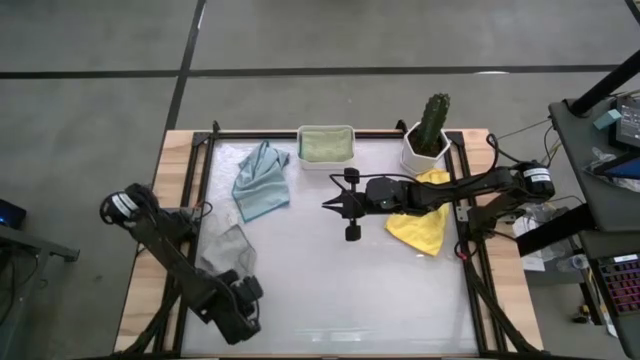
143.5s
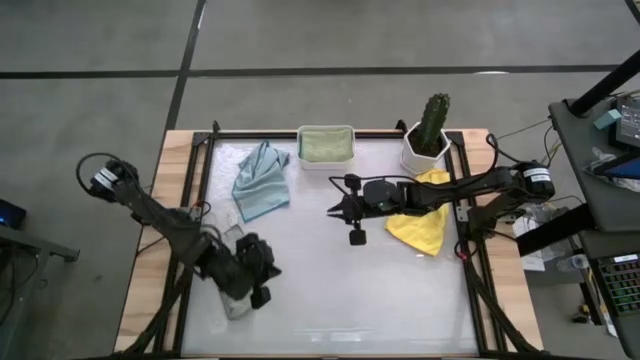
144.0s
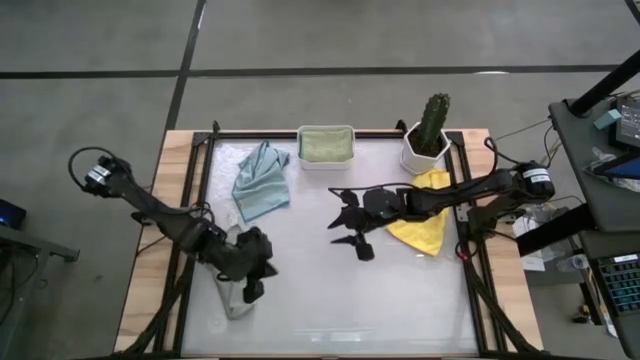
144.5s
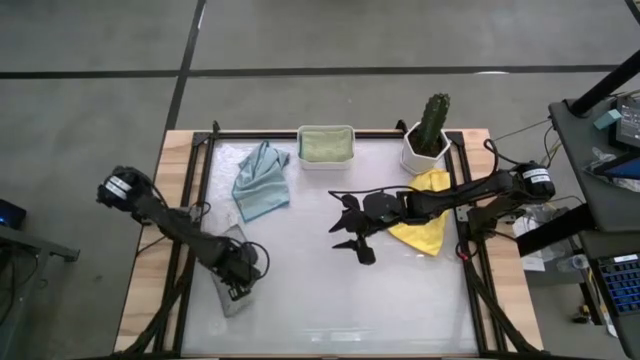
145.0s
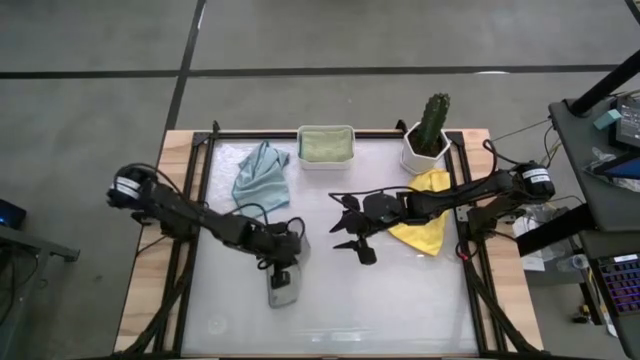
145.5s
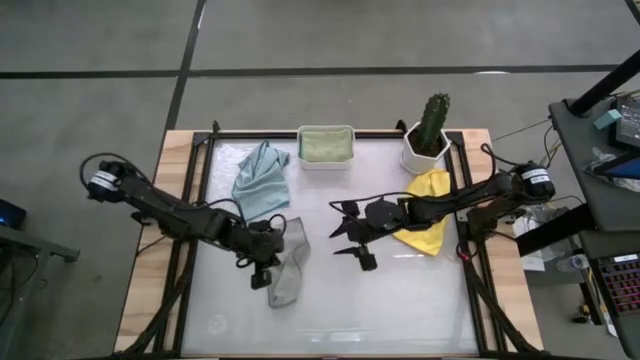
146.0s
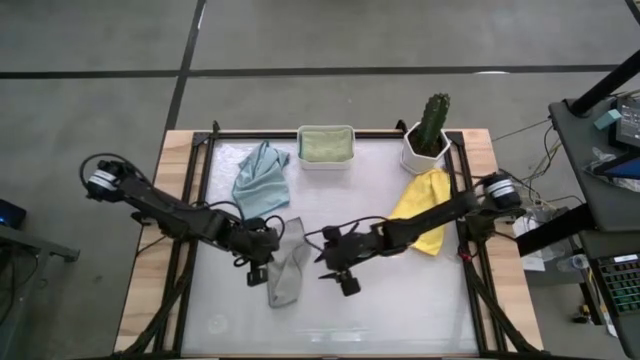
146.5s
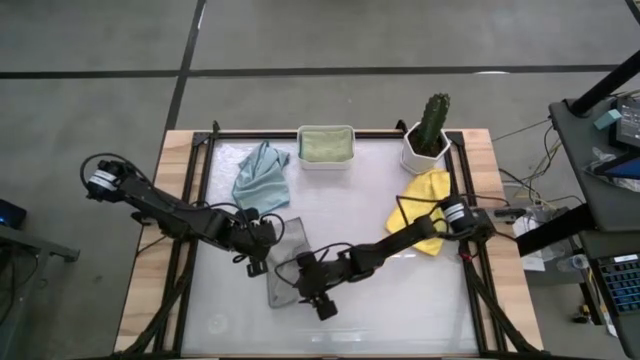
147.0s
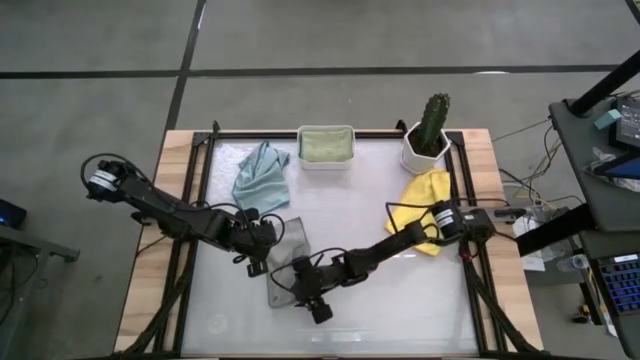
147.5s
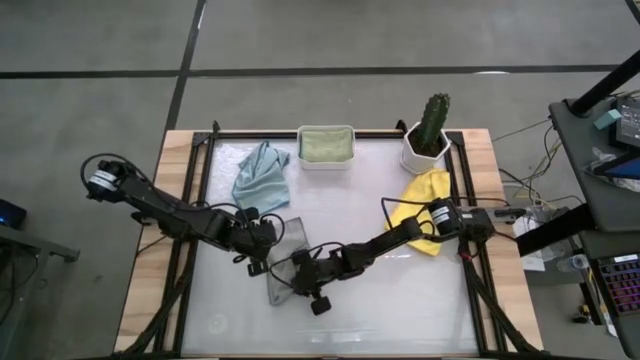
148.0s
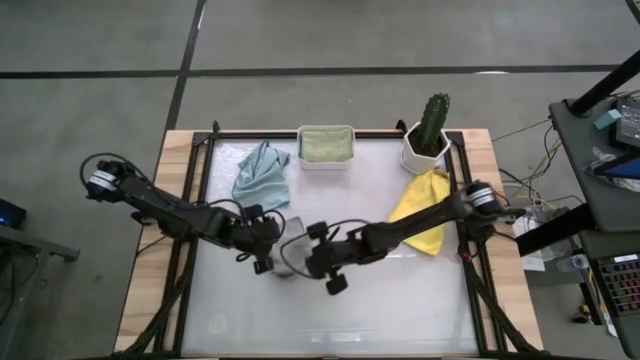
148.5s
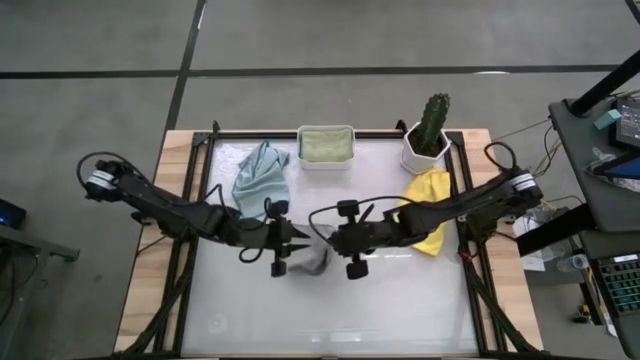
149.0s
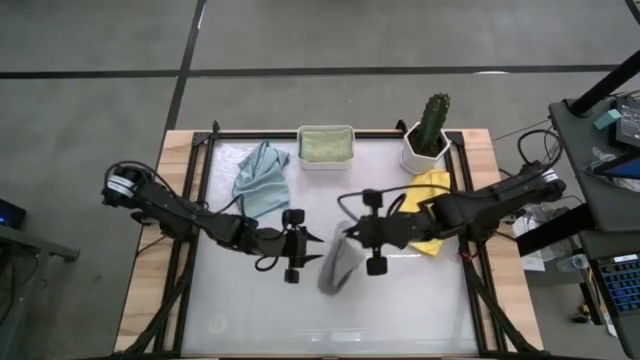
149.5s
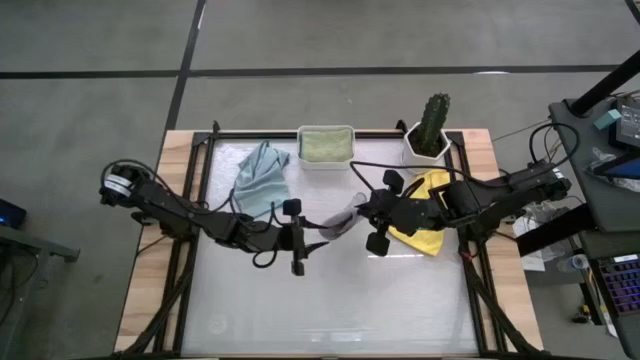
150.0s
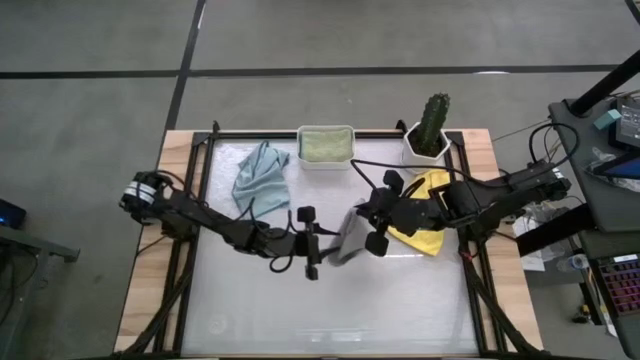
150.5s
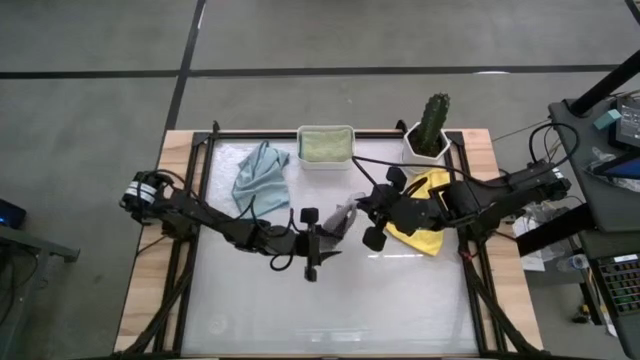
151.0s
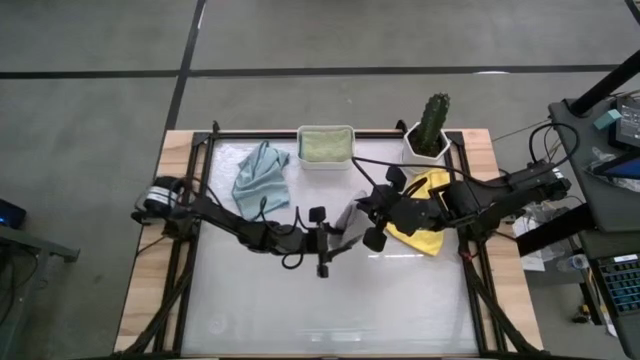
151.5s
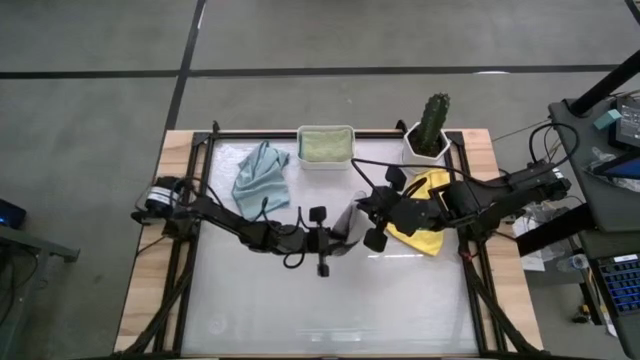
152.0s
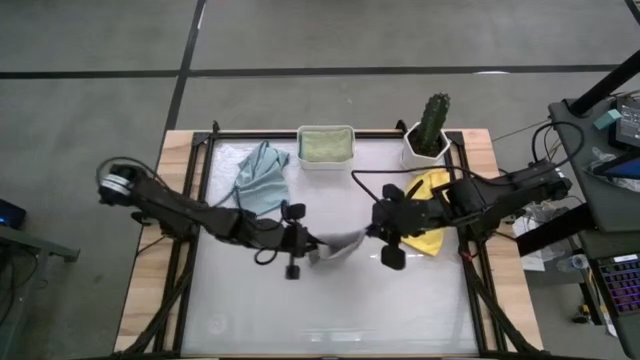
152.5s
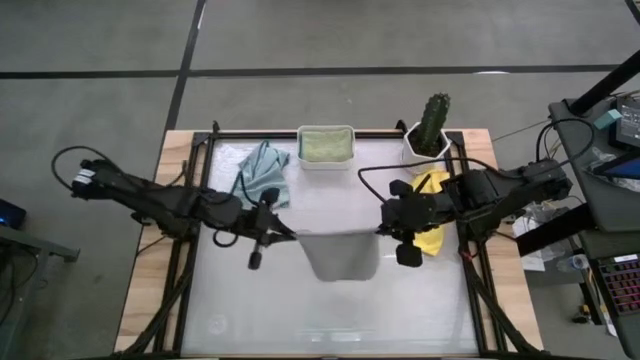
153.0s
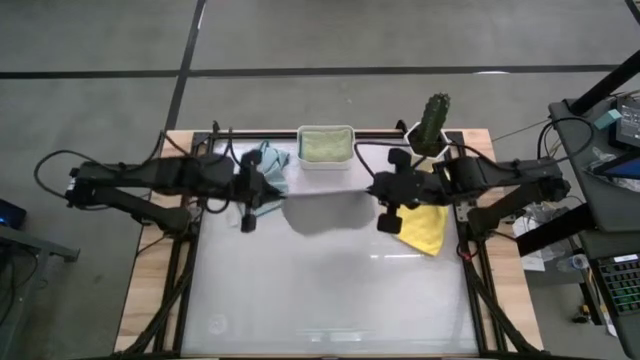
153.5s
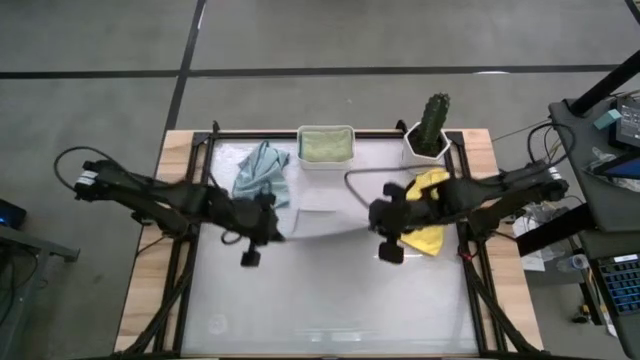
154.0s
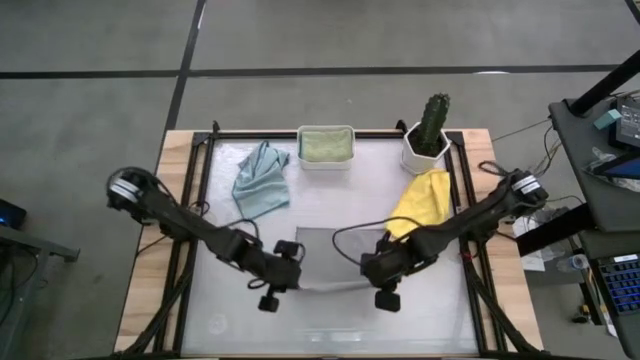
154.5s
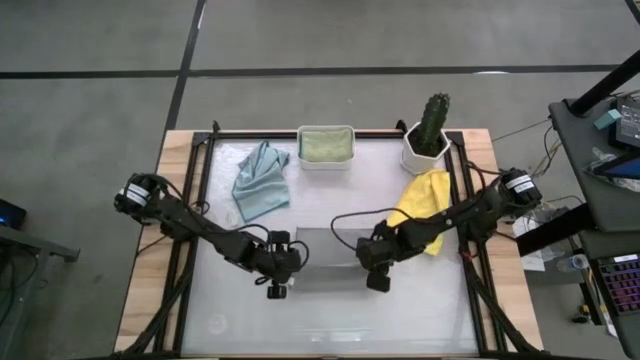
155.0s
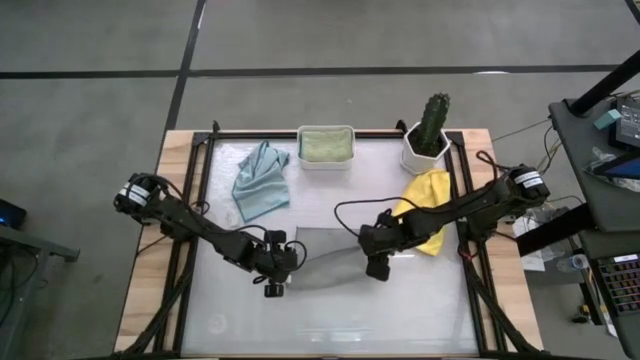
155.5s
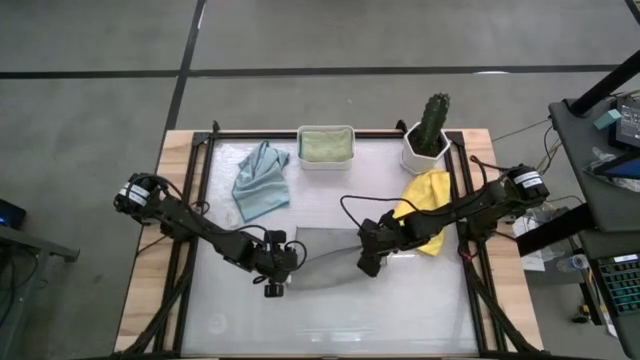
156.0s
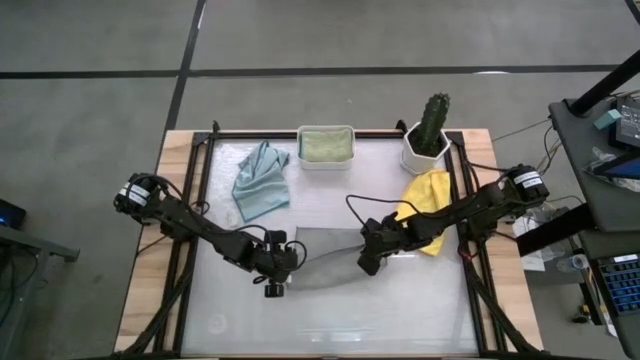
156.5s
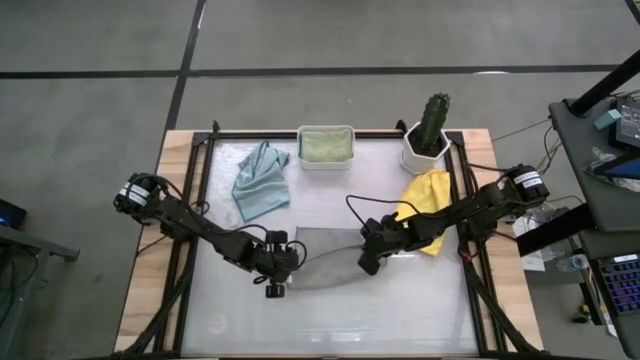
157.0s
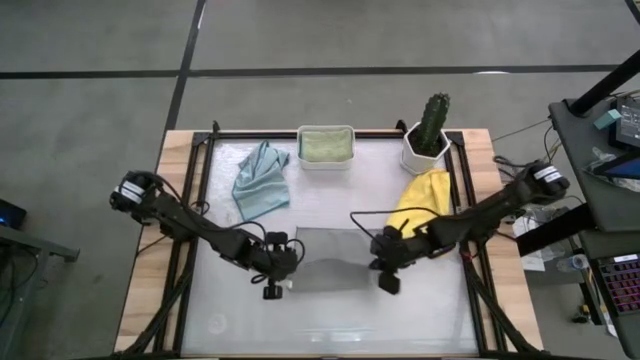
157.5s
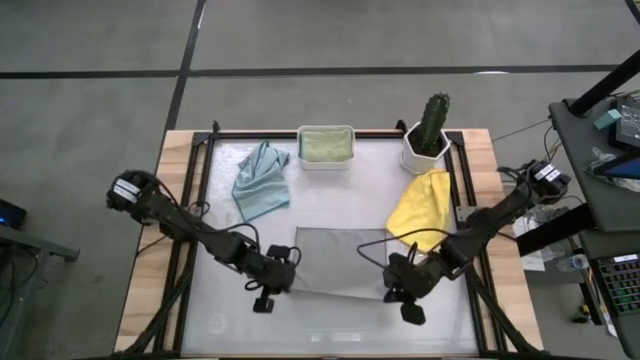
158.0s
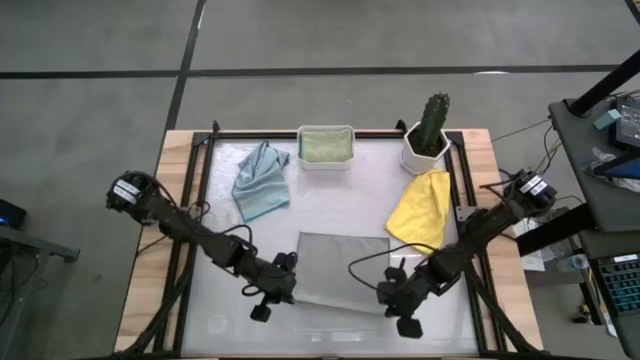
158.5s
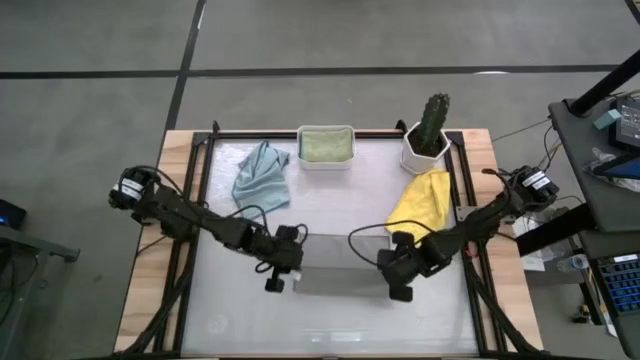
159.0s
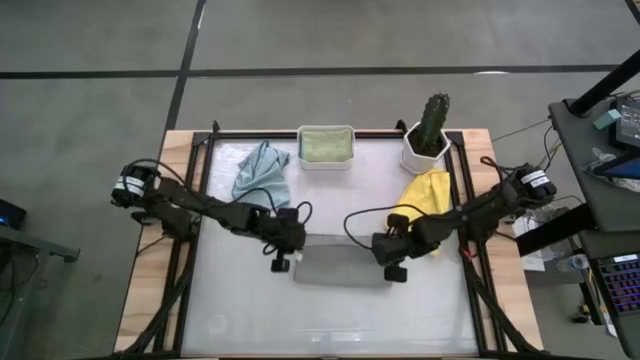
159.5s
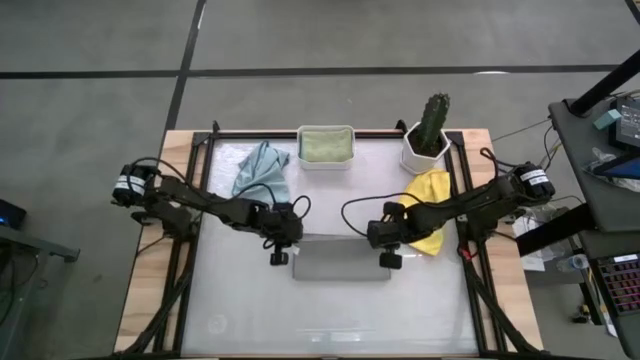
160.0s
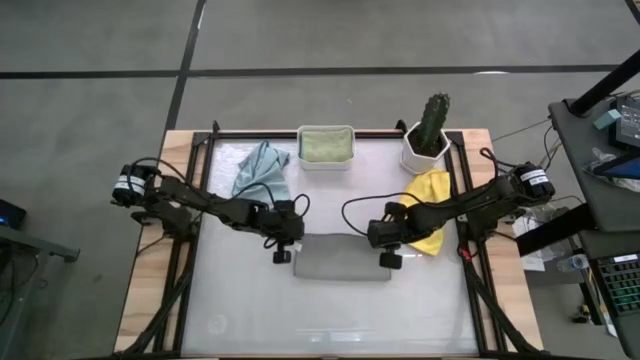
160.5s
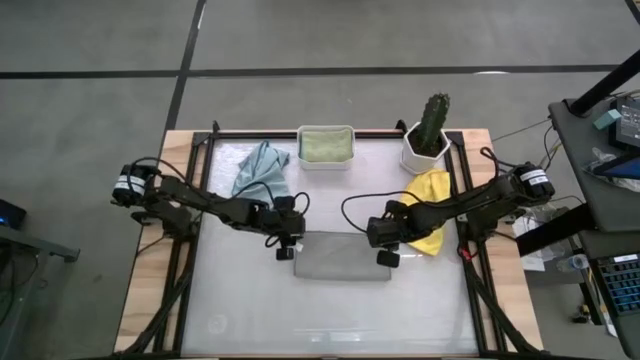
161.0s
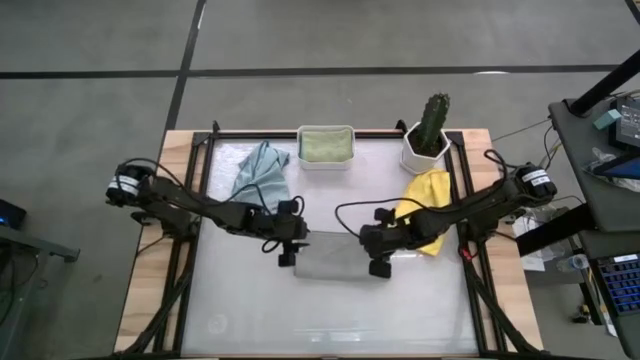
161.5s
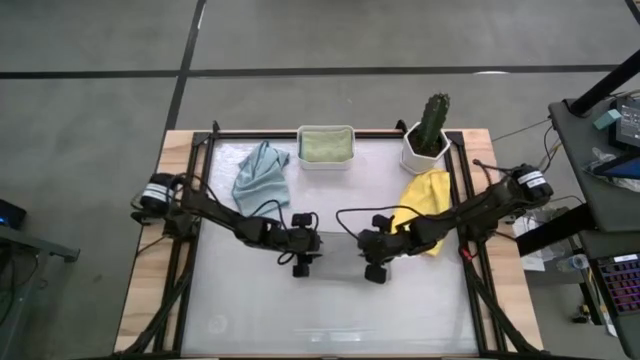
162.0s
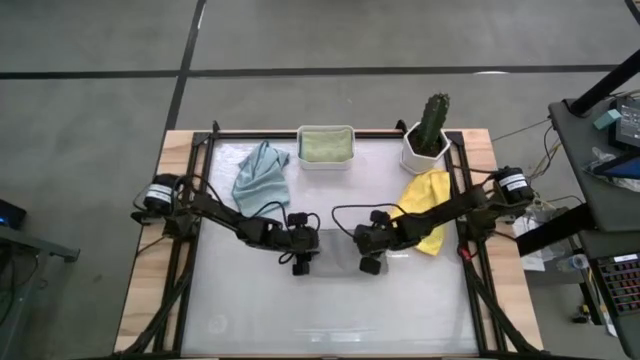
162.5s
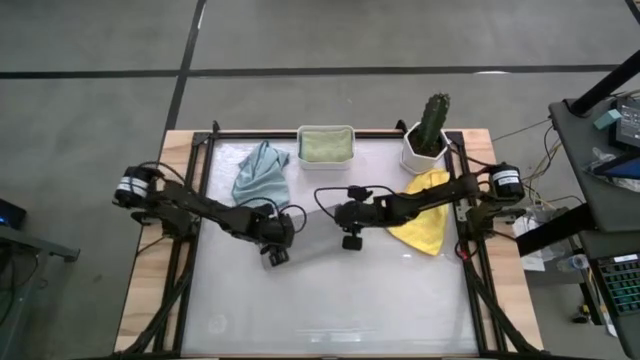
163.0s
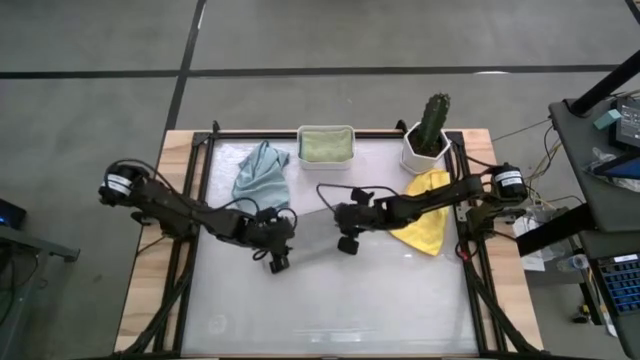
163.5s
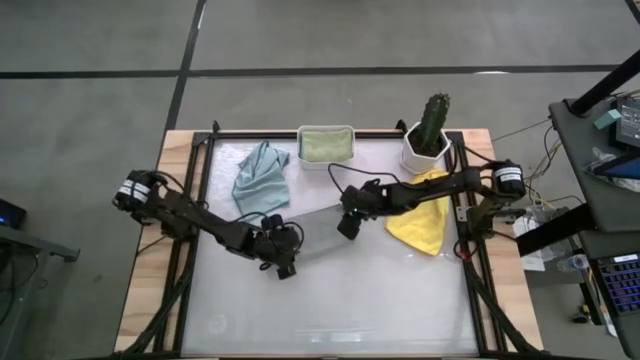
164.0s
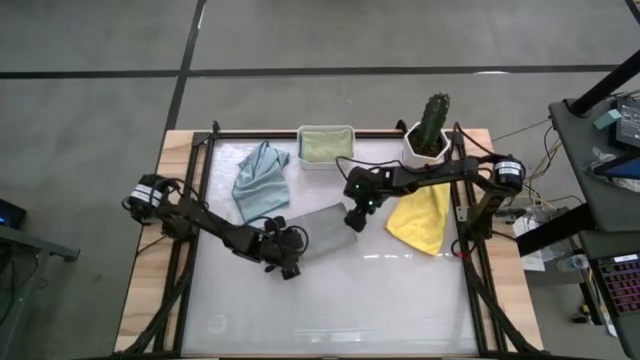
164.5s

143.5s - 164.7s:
Task: Fold microfiber towels
Fold the gray cloth
